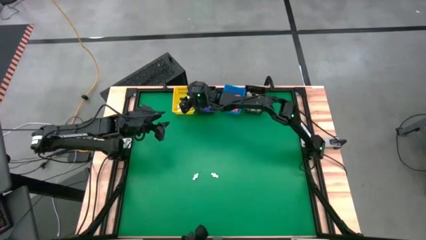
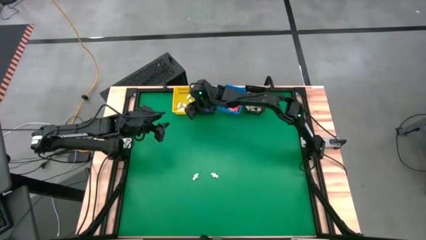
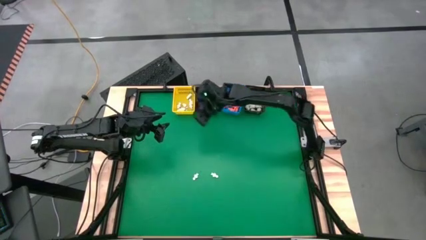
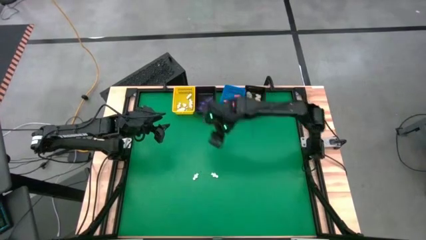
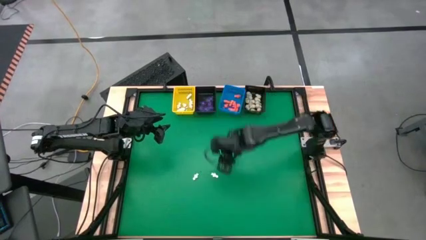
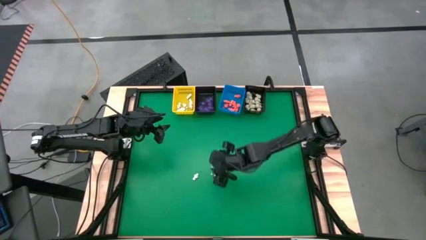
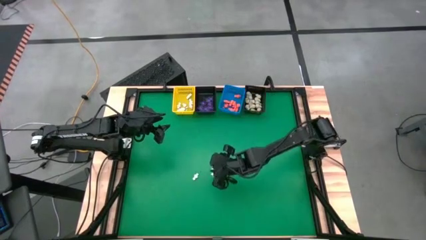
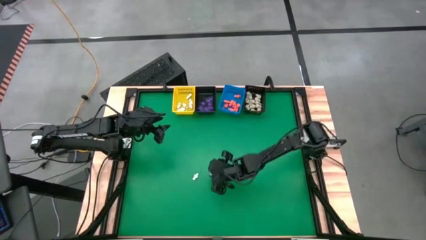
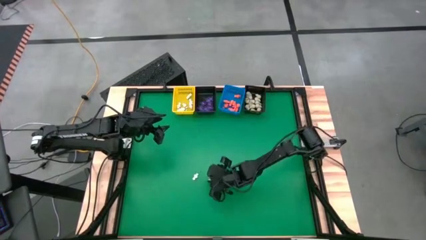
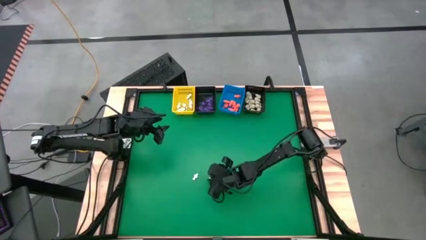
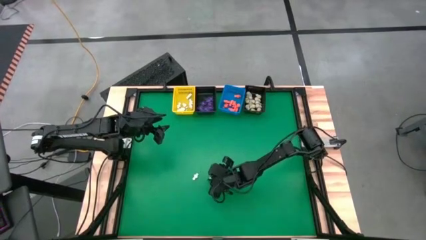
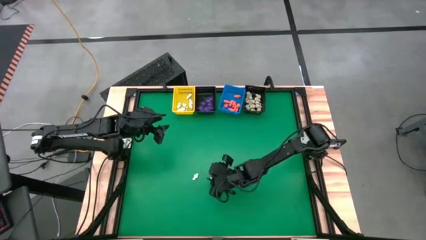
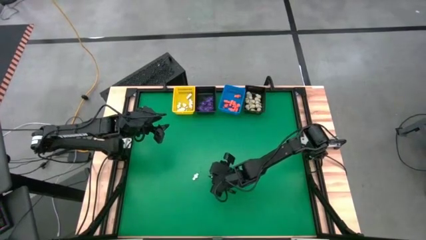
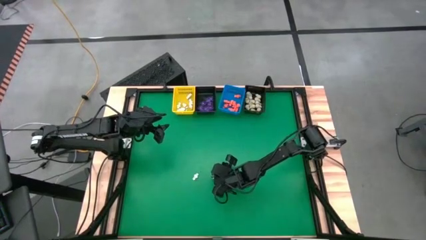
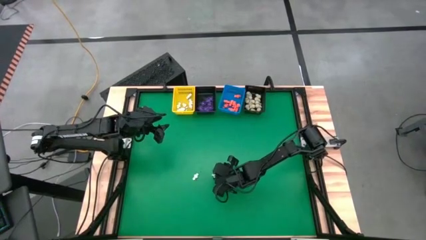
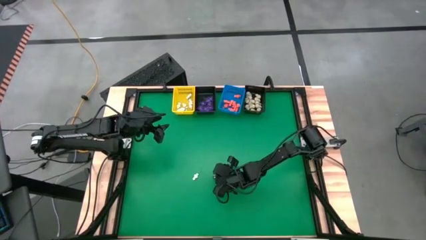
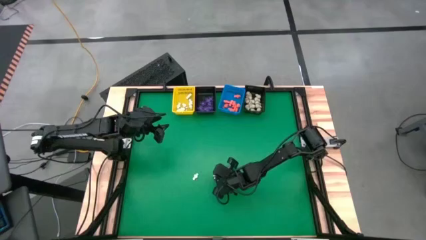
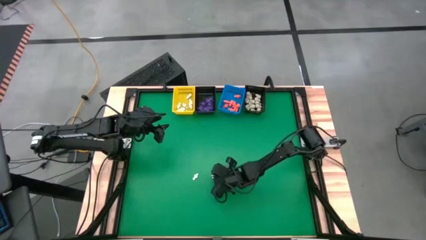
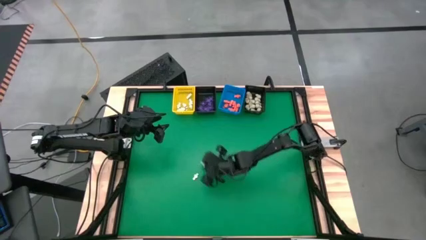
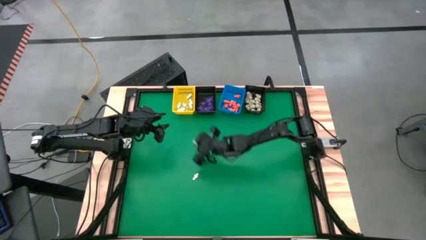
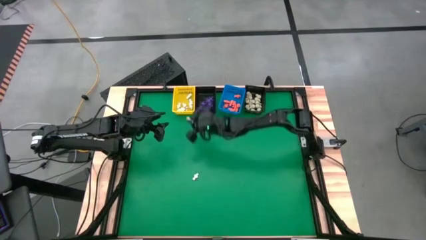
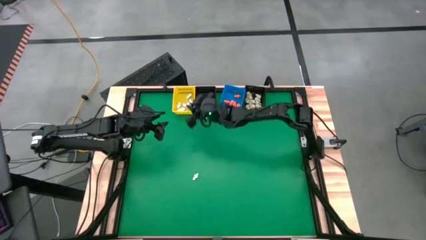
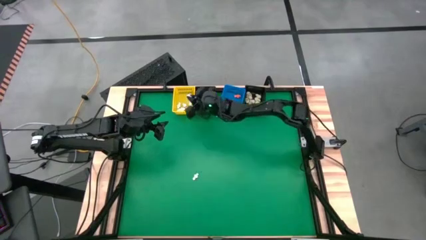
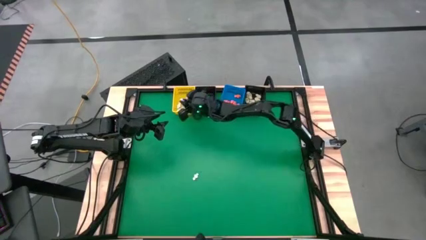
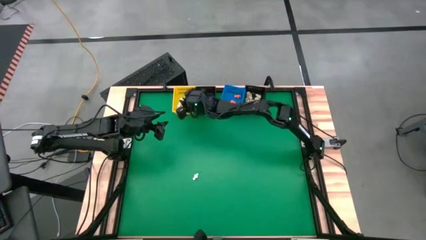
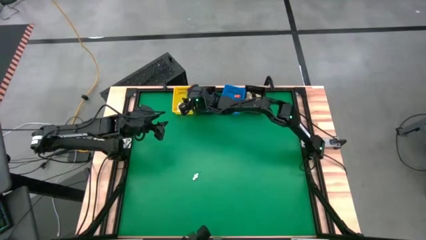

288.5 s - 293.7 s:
Task: Sort Halloween decoration
Put the white skeleton toy into the yellow basket

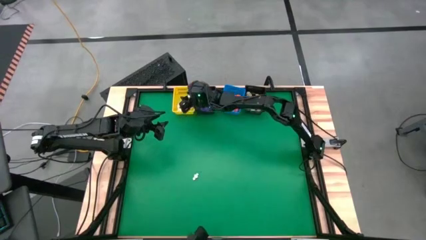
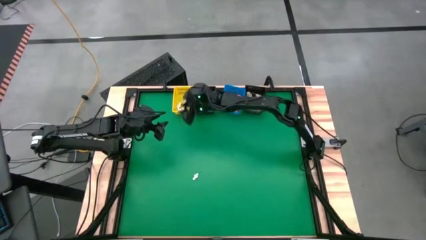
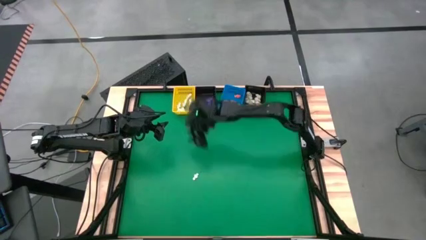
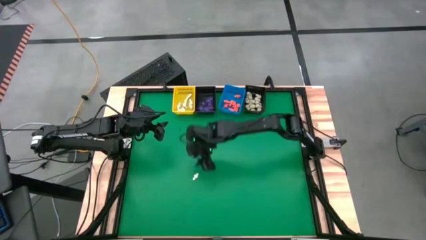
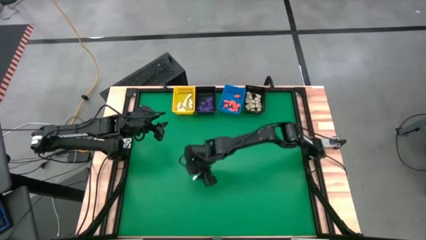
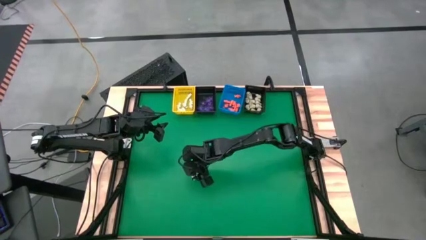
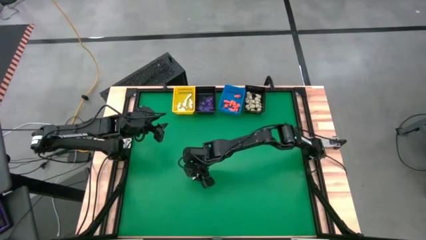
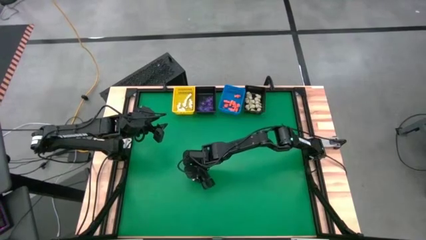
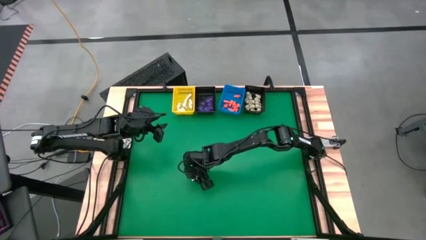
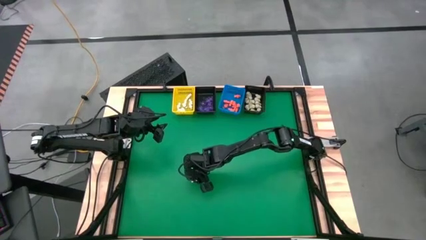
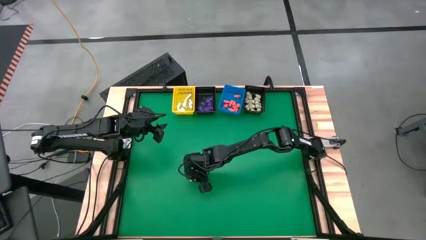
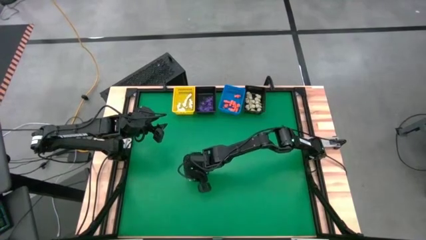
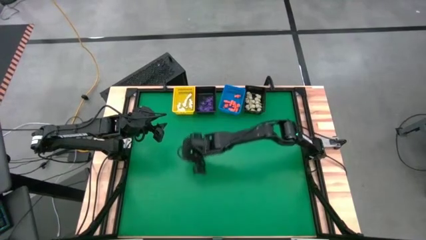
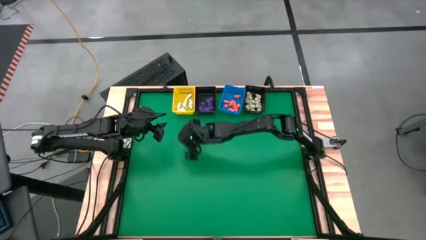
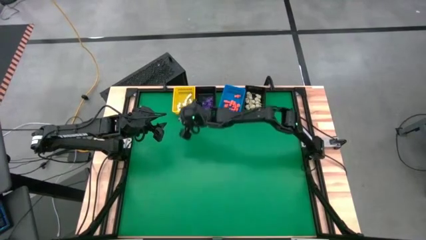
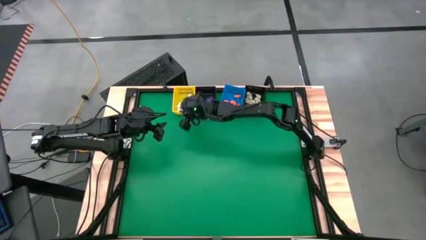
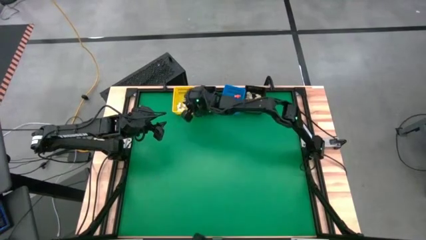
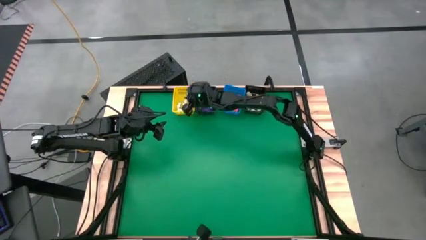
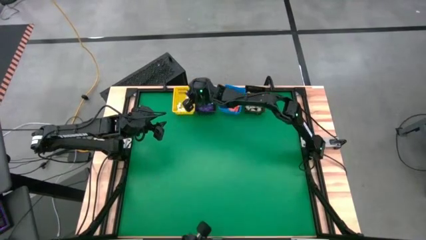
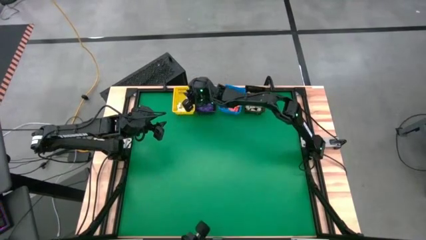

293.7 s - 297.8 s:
Put the white skeleton toy into the yellow basket

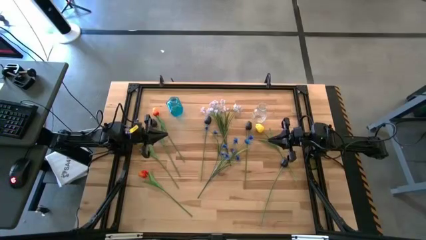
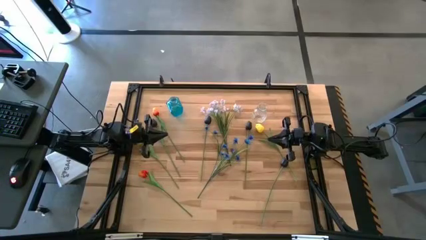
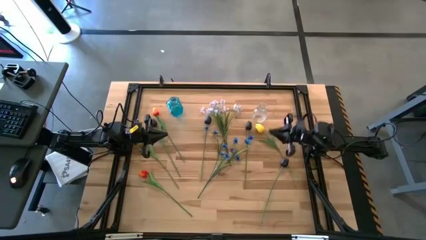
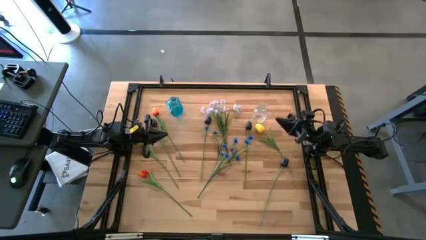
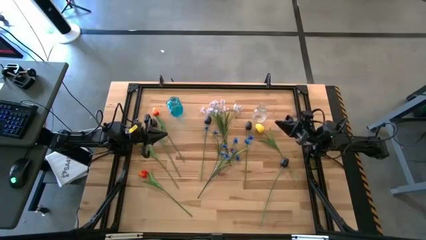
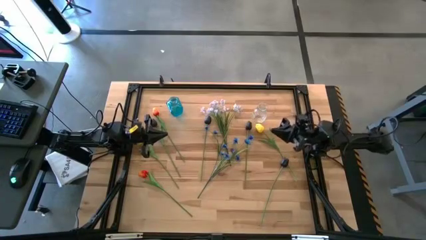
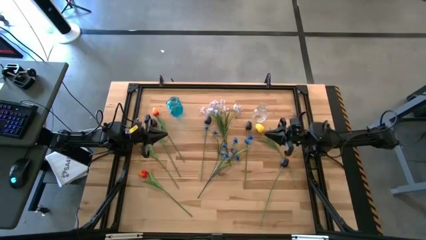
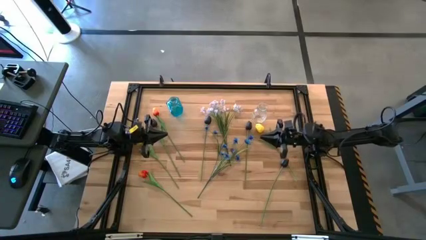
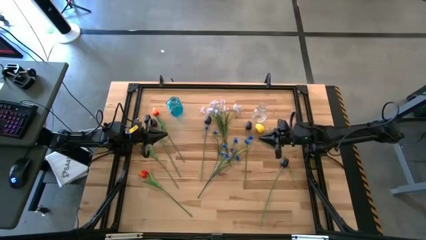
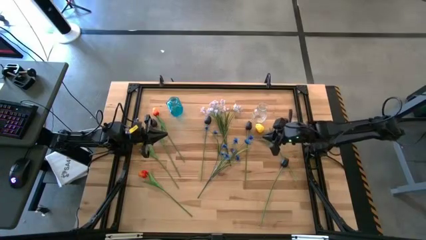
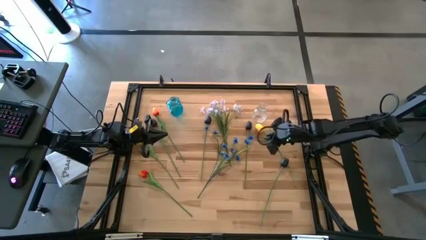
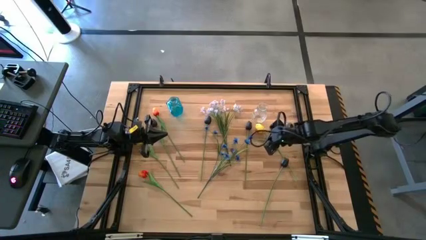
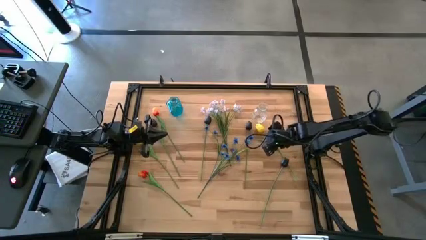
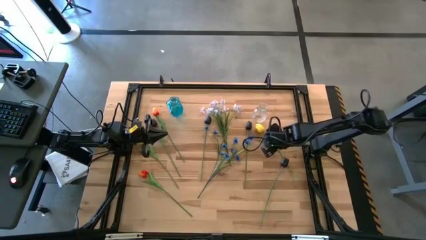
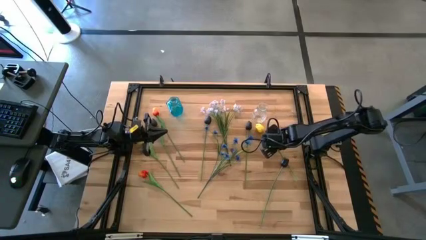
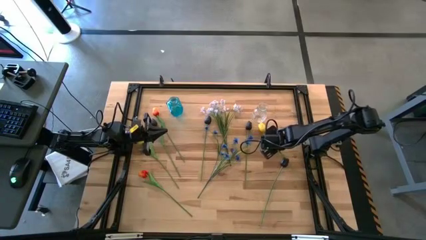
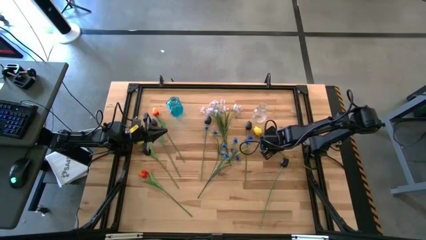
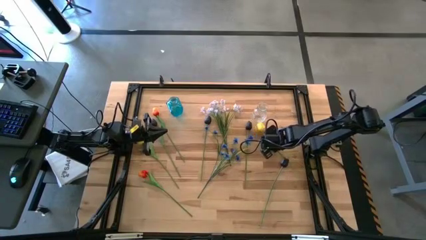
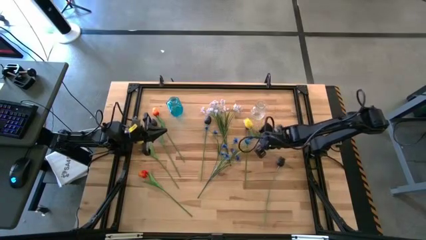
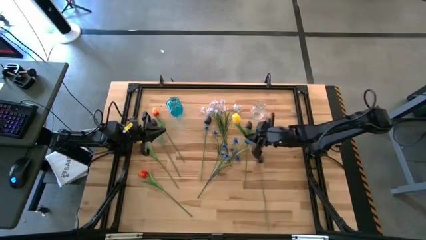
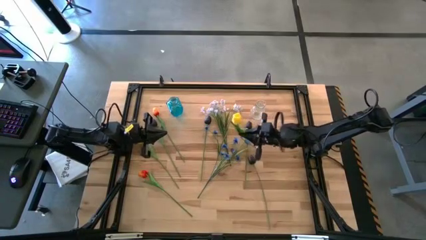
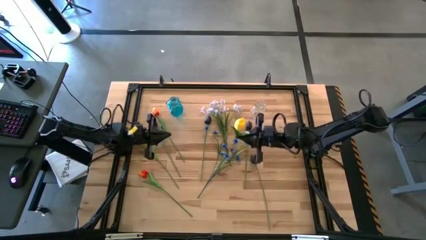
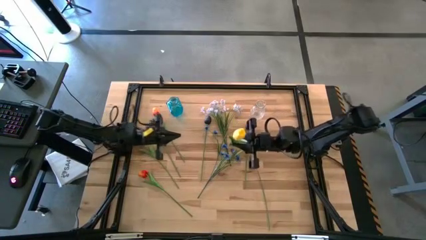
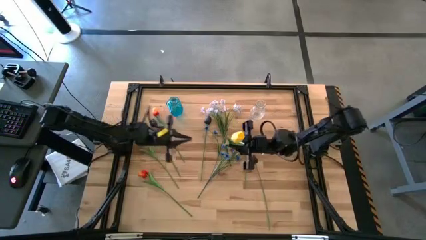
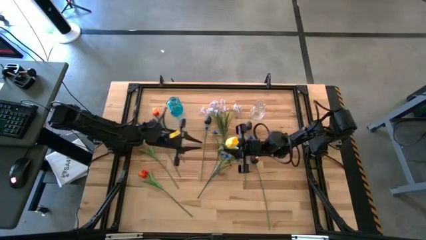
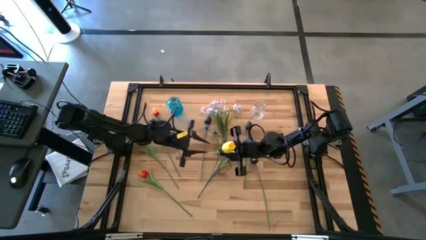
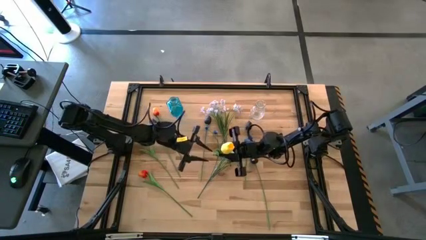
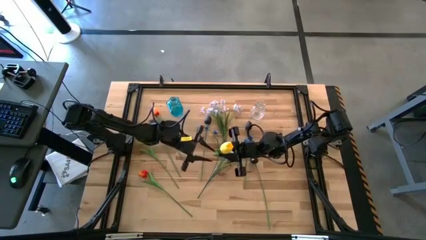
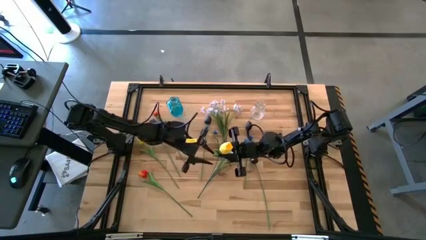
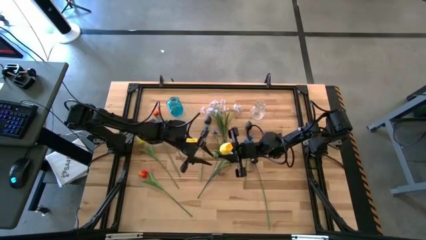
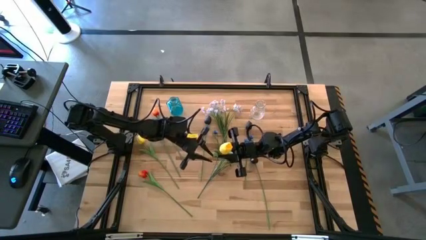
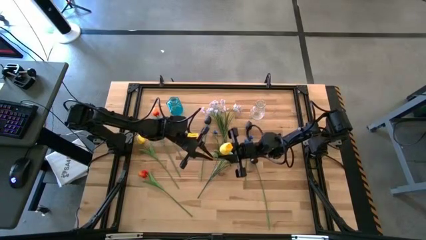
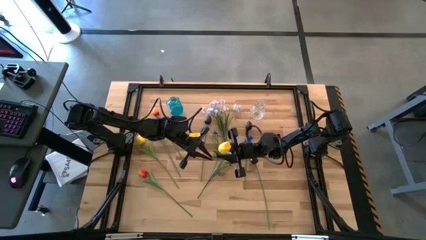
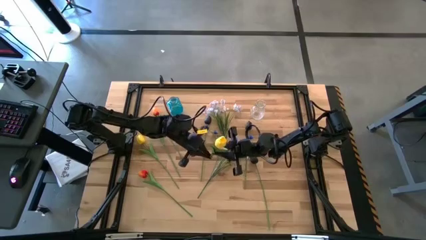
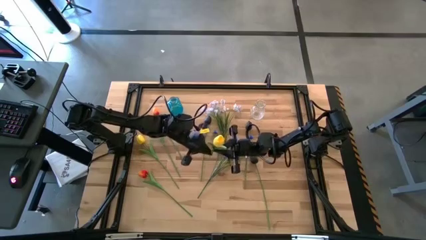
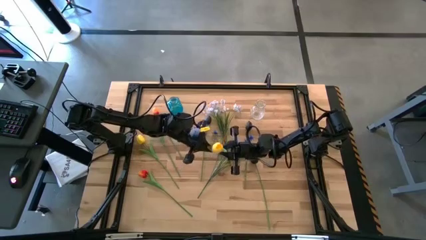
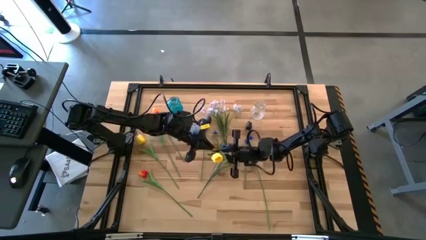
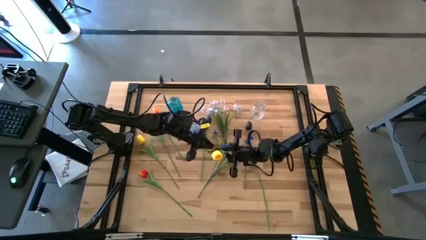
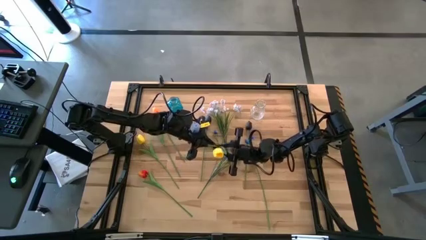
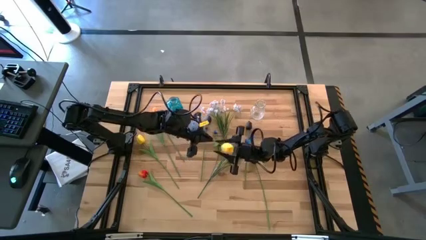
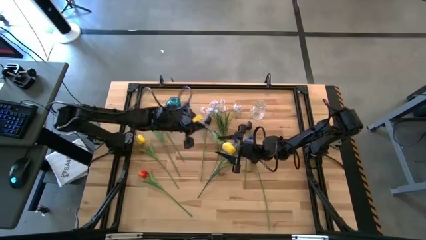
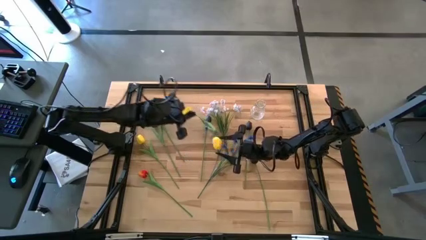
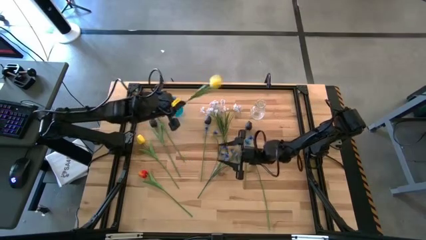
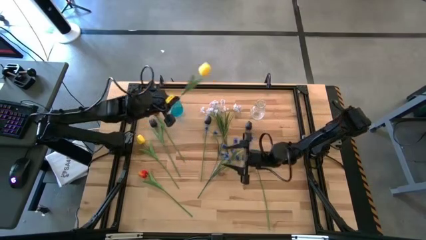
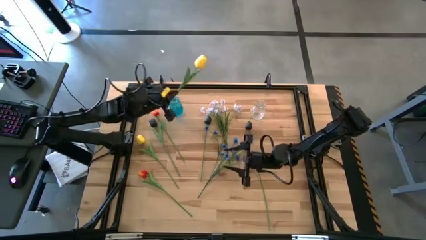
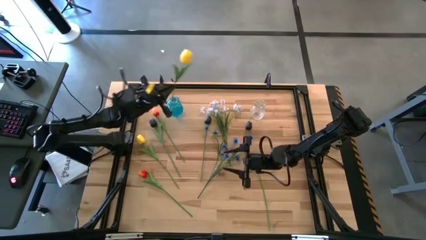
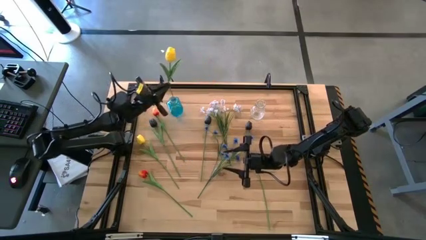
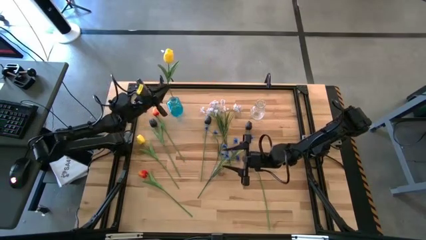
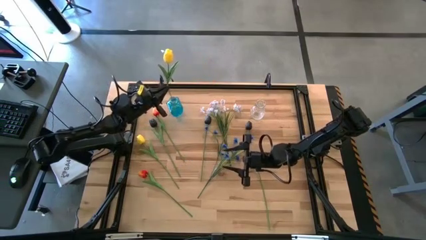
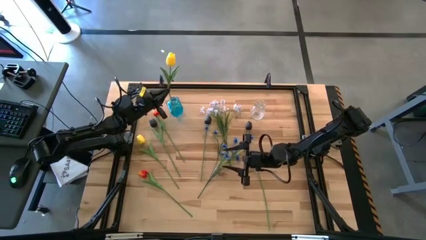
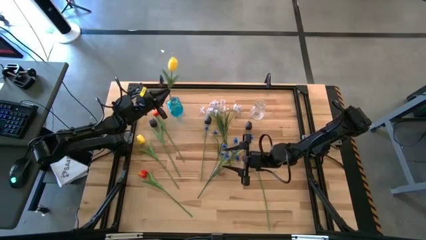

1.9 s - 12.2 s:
Task: Sort flowers into vase by color
Put the right yellow flower into the blue vase
